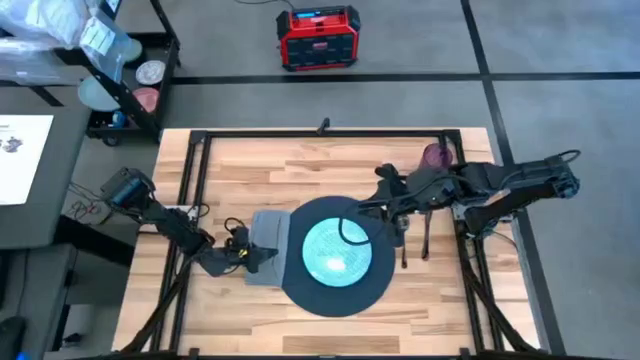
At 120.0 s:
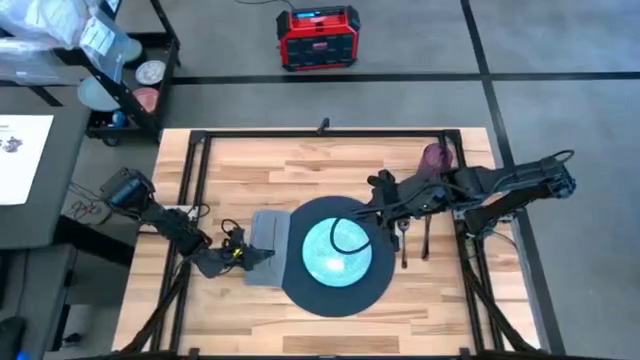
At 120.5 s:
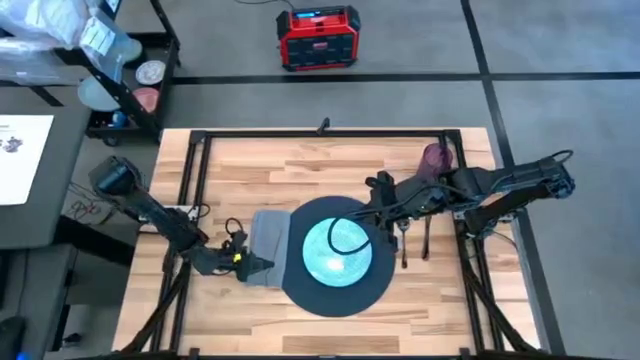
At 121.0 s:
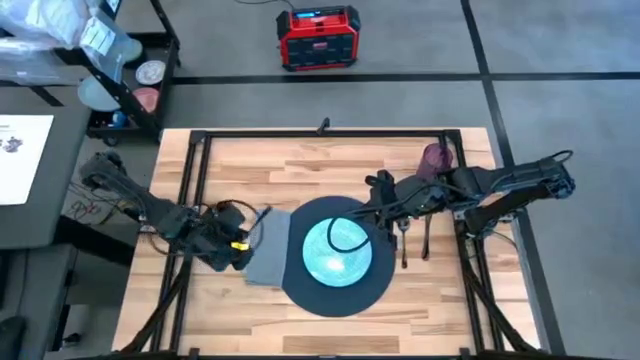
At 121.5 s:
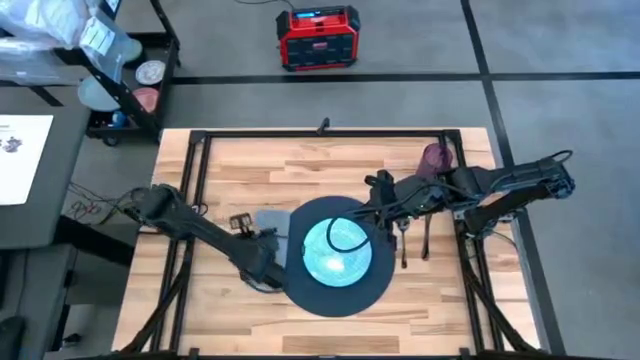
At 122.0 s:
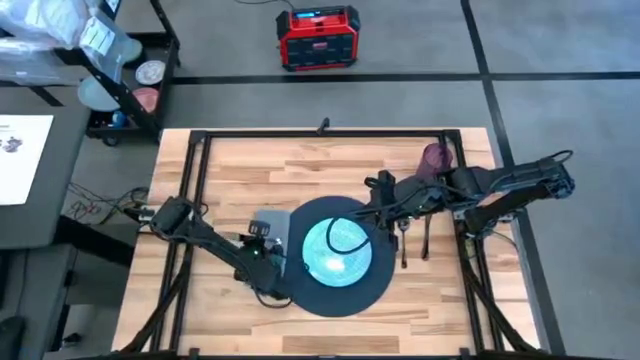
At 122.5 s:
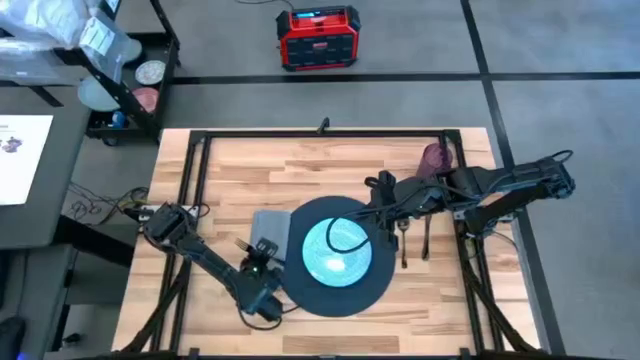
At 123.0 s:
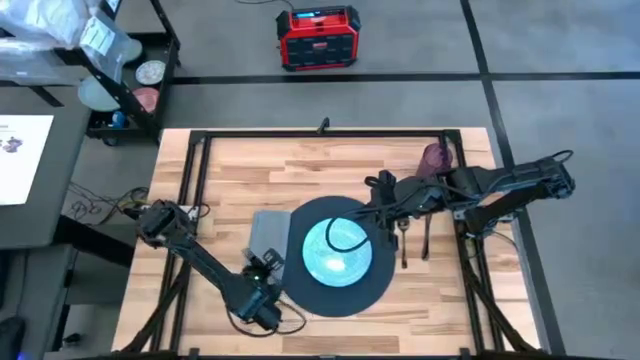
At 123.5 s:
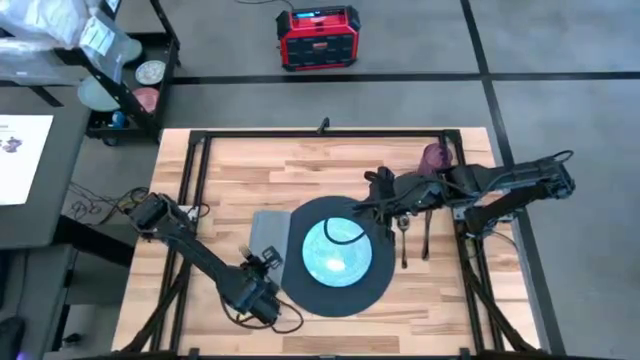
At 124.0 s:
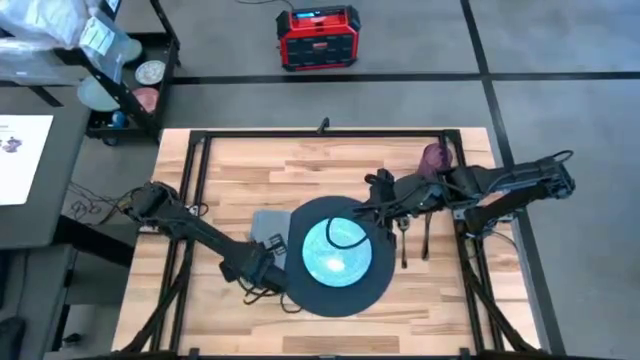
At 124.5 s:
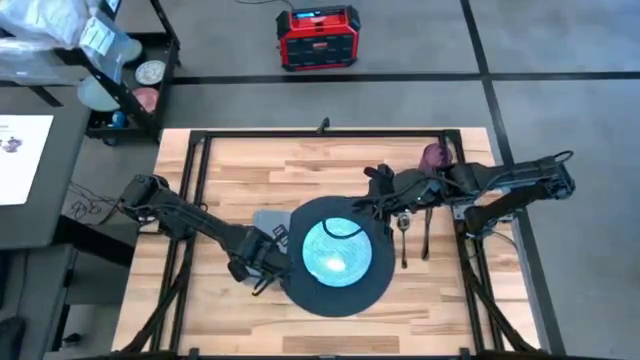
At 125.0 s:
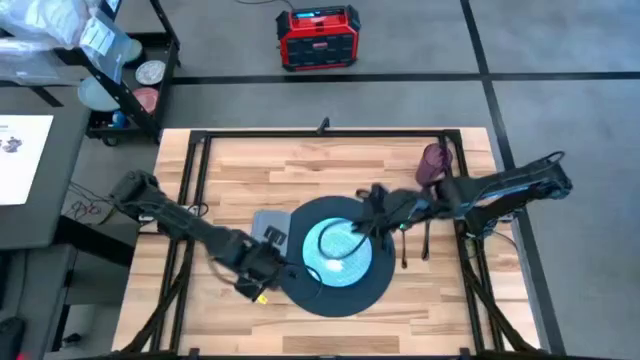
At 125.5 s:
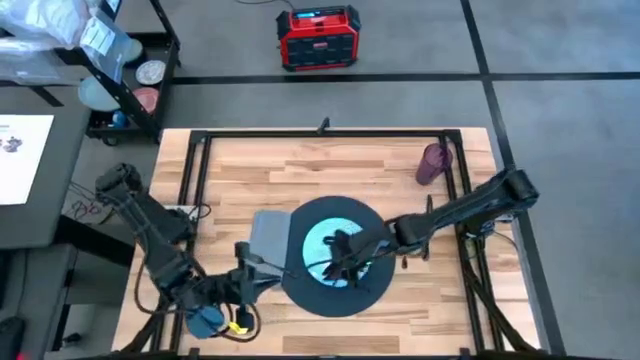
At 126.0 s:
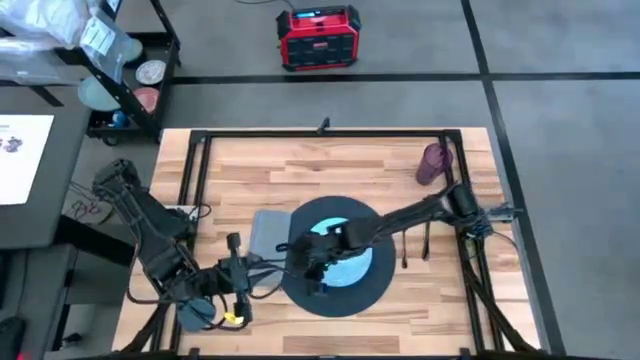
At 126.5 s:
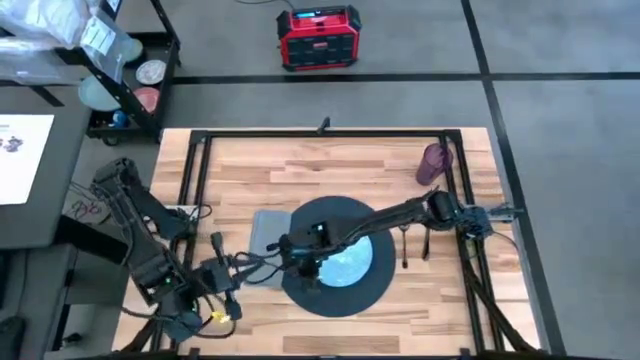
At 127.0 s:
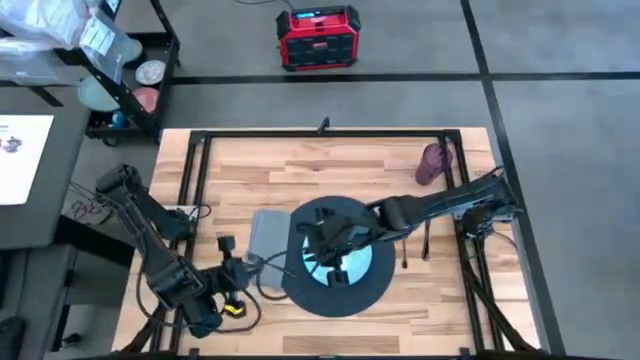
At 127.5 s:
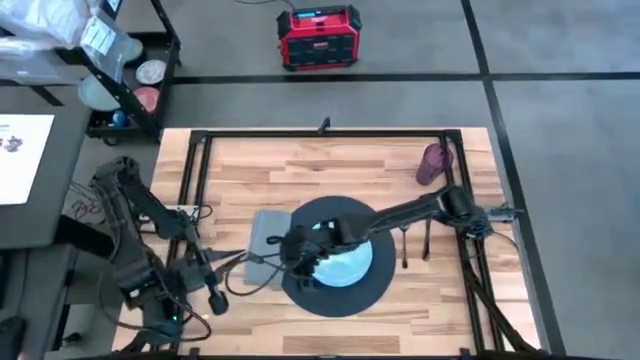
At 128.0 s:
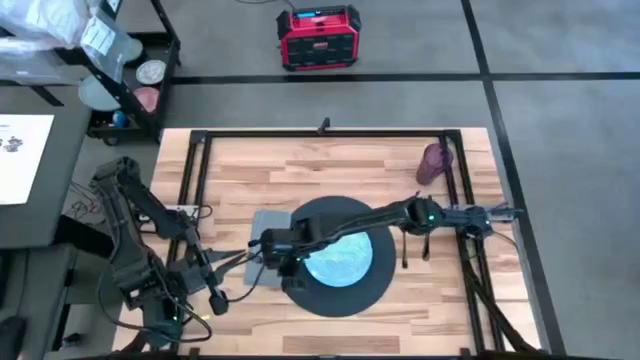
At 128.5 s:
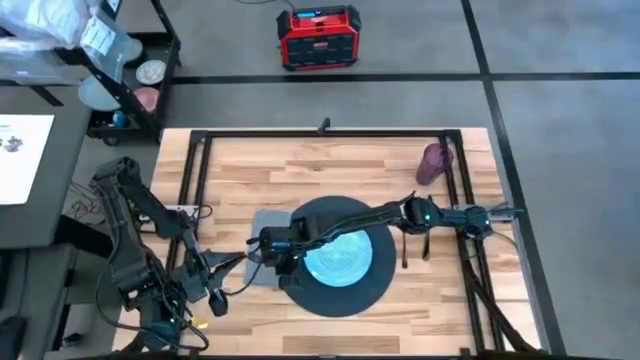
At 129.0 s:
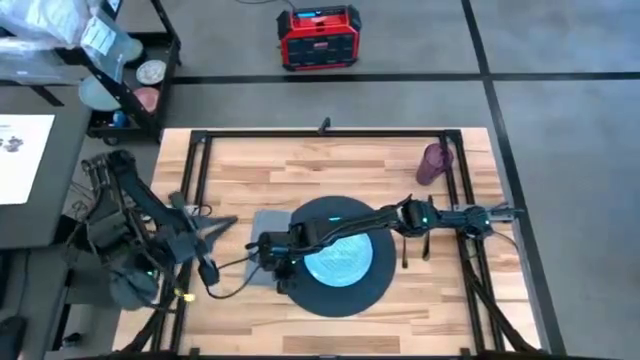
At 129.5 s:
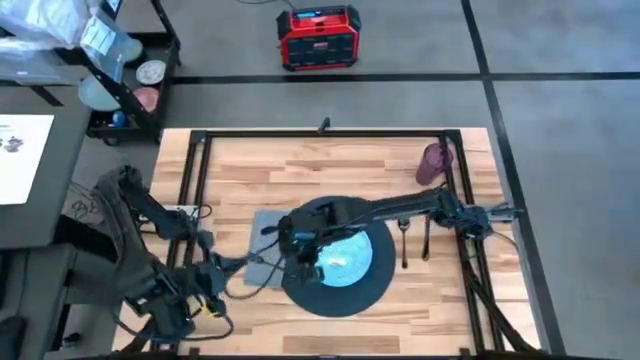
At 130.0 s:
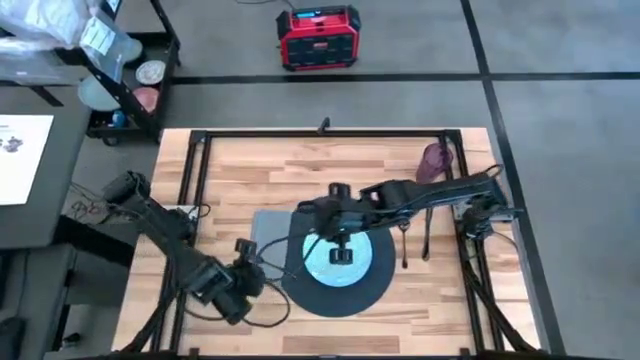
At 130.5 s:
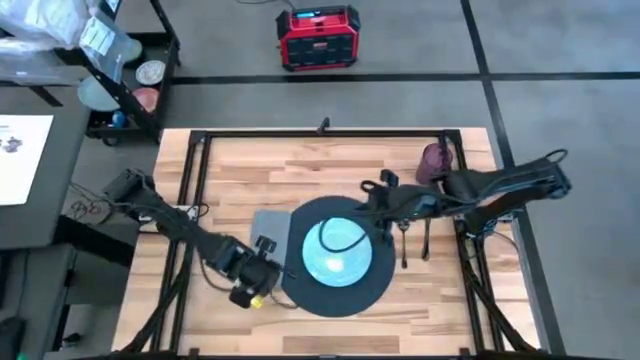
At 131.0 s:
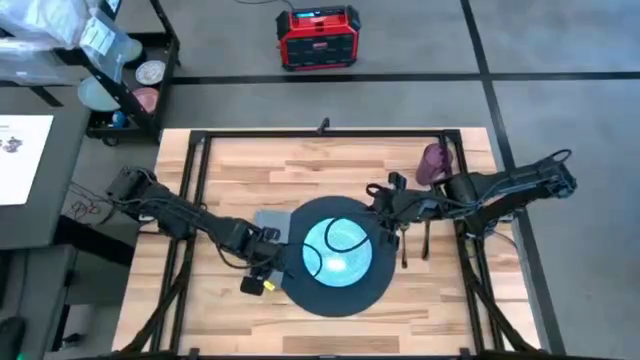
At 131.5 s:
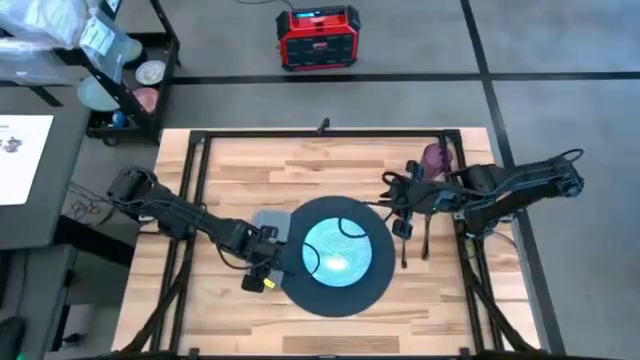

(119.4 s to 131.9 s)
Task: Set table place
Adjust the black fork on the gray table napkin

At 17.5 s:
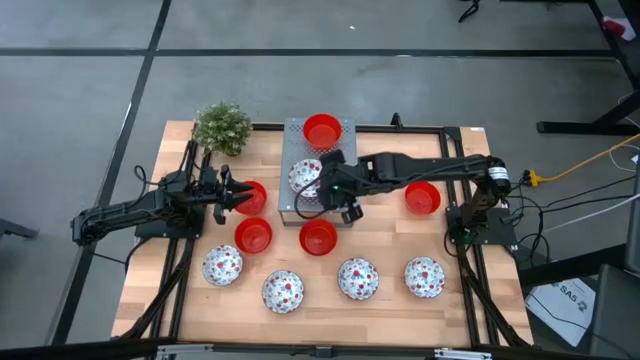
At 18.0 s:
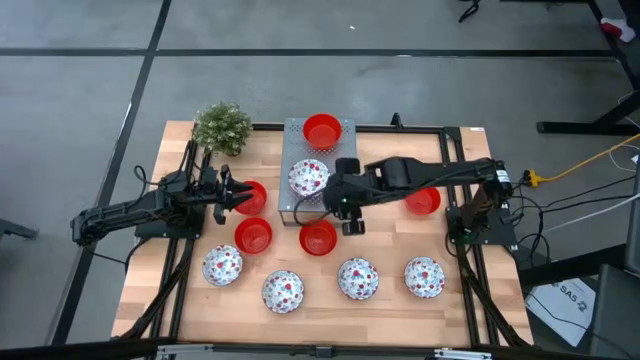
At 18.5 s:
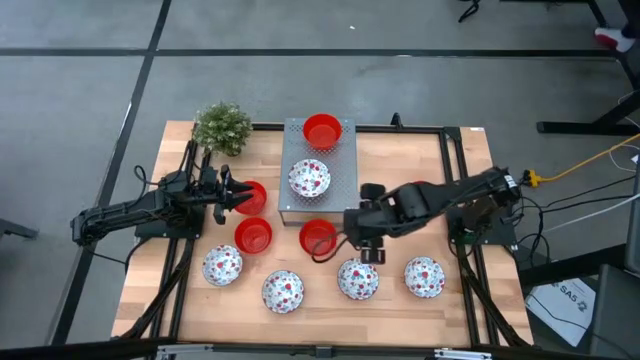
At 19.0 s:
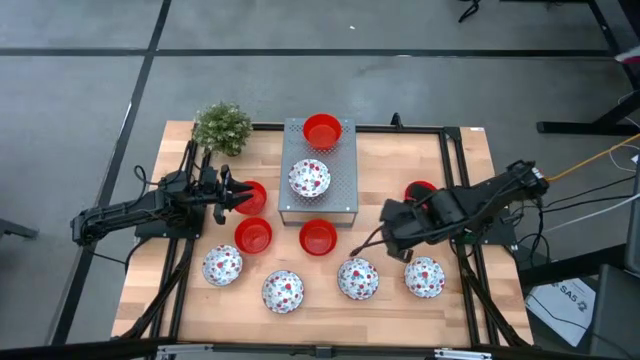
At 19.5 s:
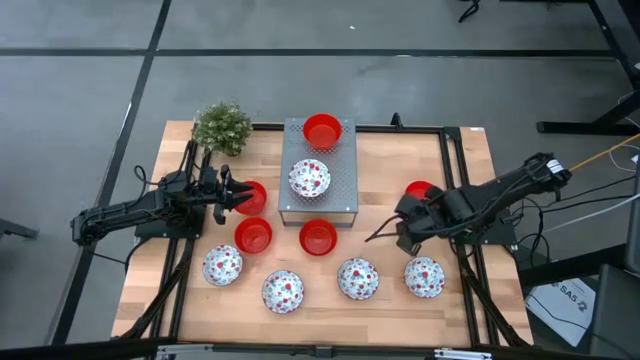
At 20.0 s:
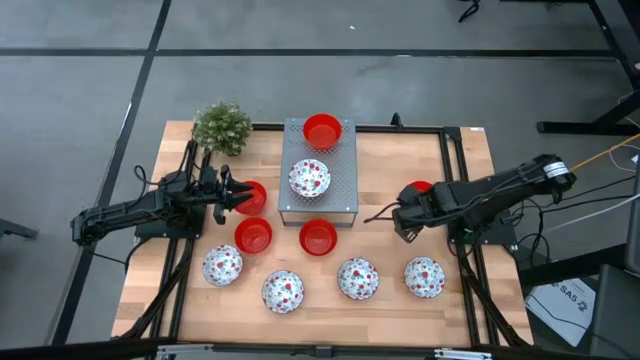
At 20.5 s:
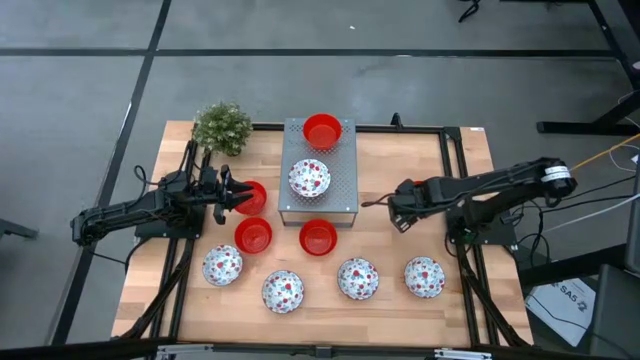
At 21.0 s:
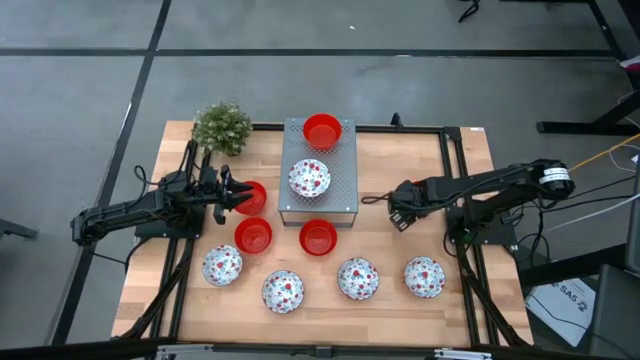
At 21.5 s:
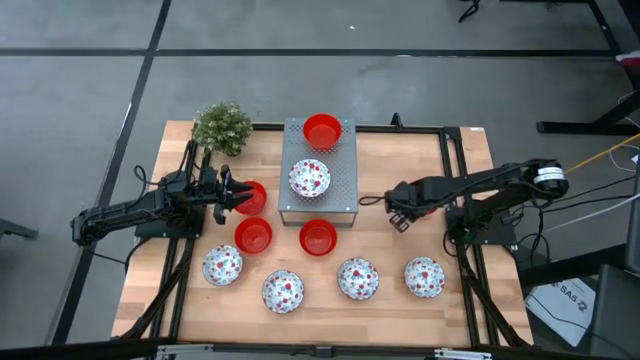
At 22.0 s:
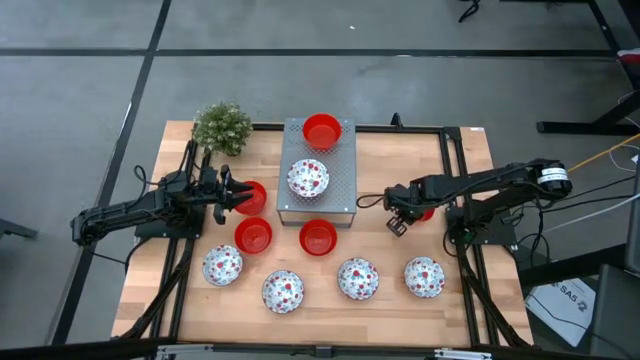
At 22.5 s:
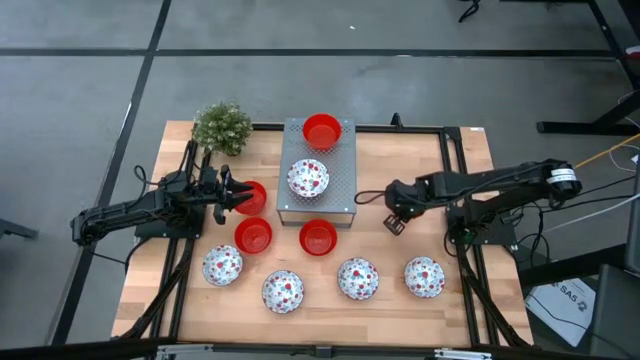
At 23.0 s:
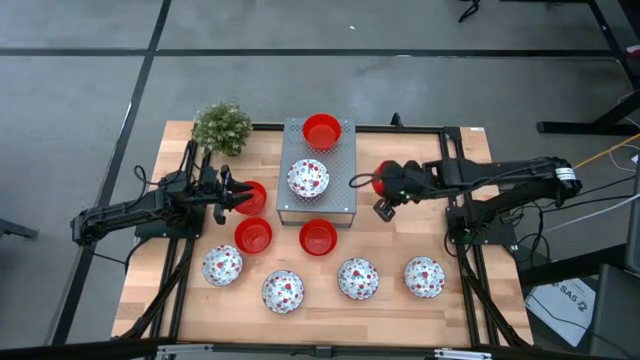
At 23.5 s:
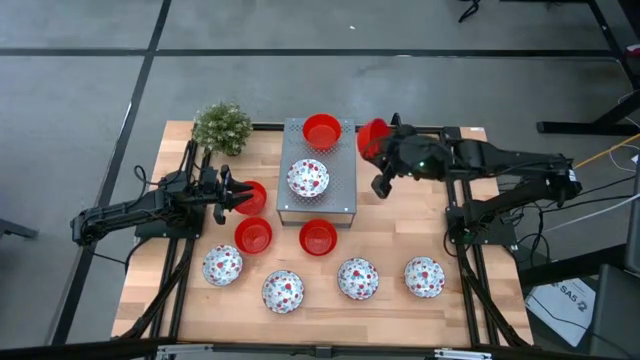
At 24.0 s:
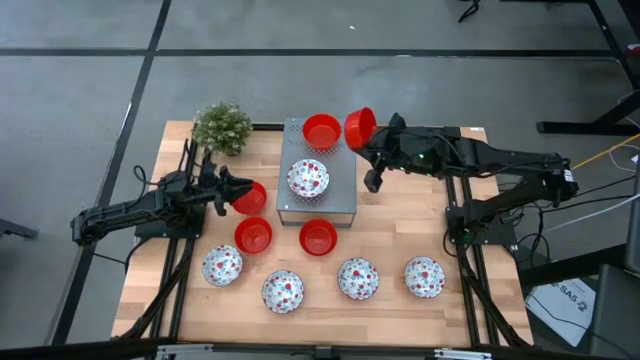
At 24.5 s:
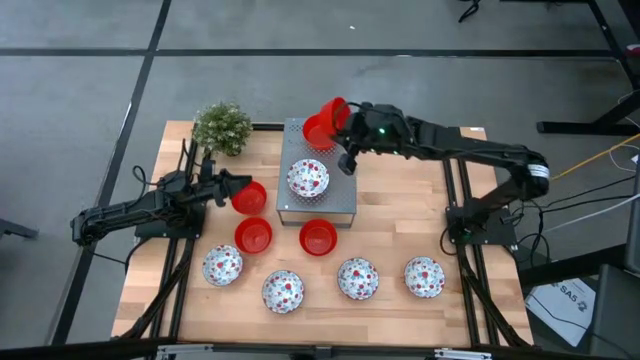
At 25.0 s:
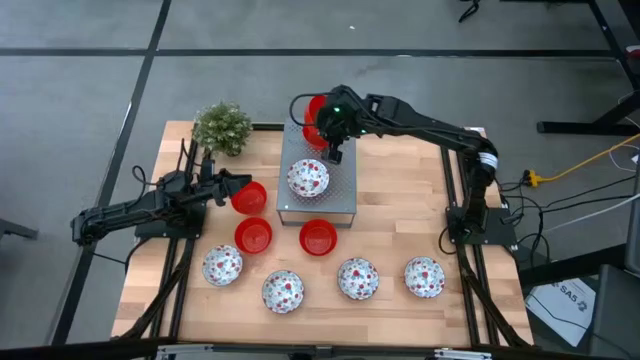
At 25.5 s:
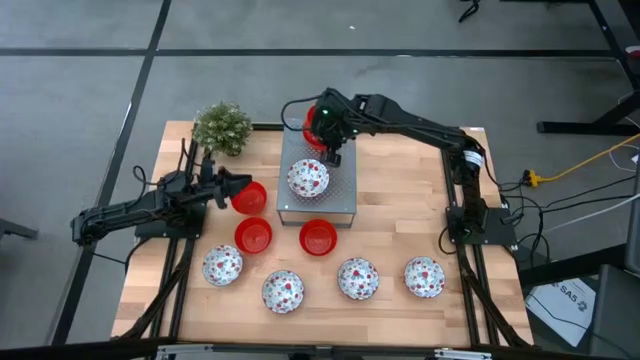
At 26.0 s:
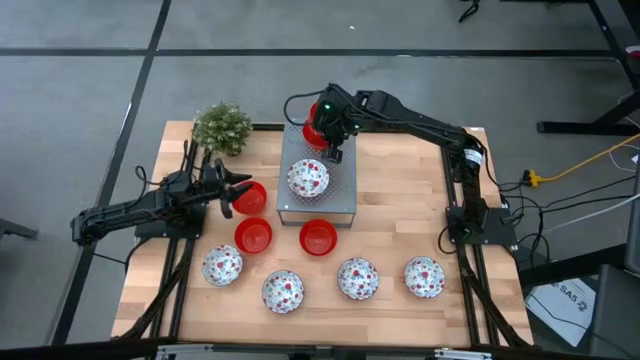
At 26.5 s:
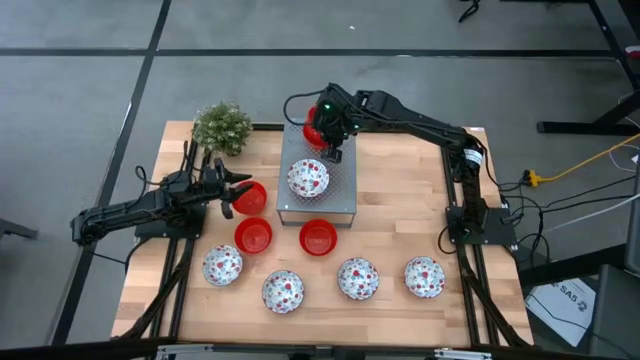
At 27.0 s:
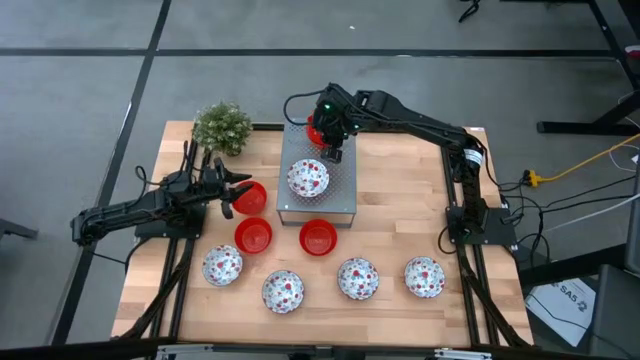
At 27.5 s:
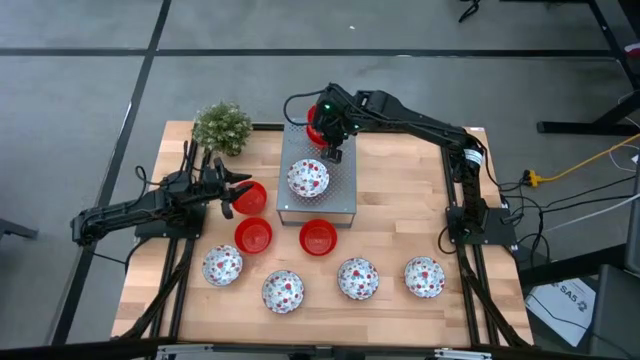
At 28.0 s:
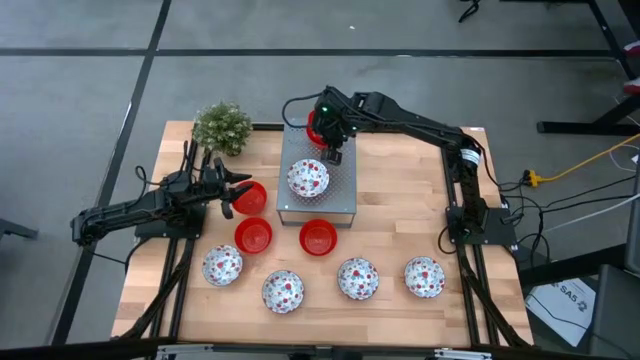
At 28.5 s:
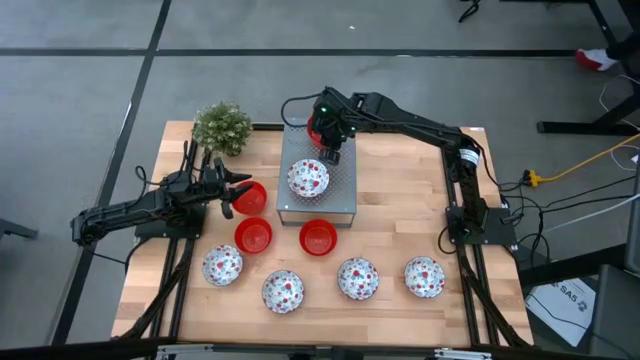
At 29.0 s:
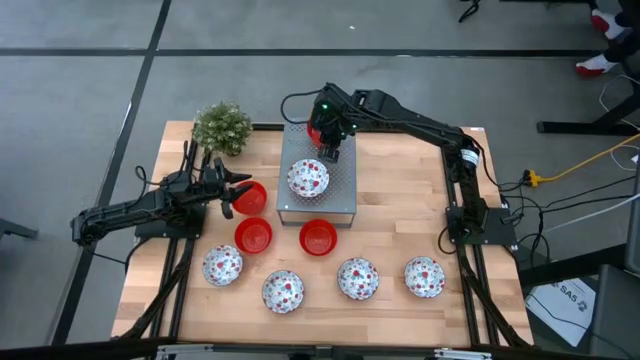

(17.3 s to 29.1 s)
Task: Pick & Place Mini bowls
Stack the red bowl on the red bowl on the shelf
